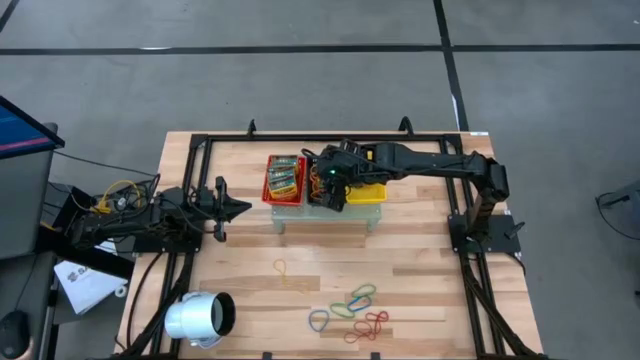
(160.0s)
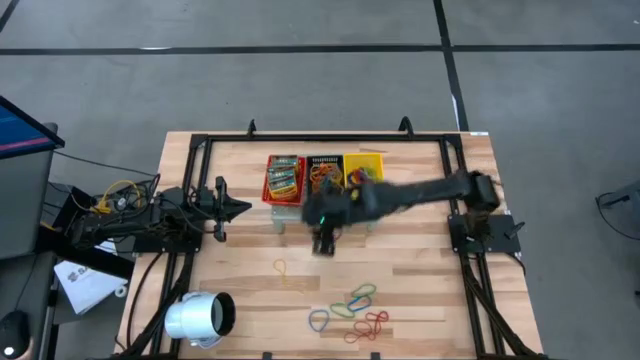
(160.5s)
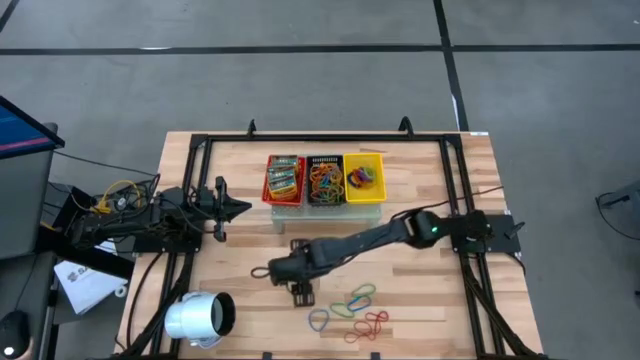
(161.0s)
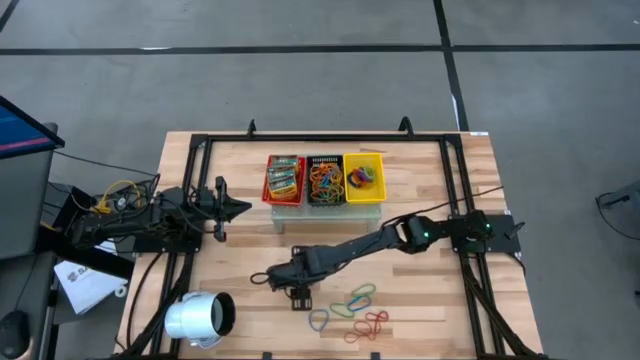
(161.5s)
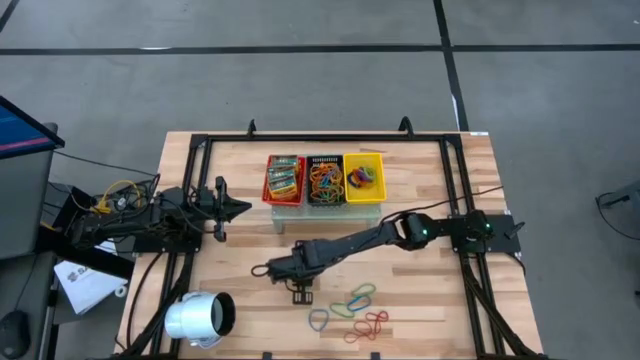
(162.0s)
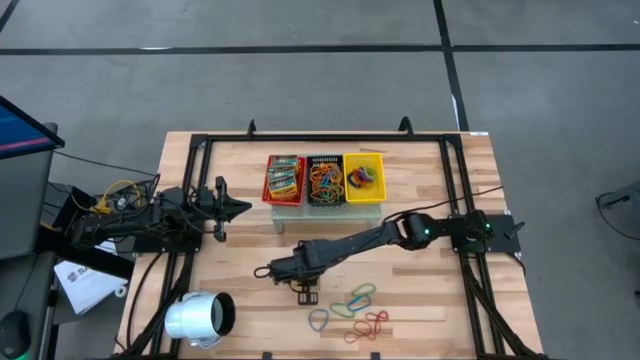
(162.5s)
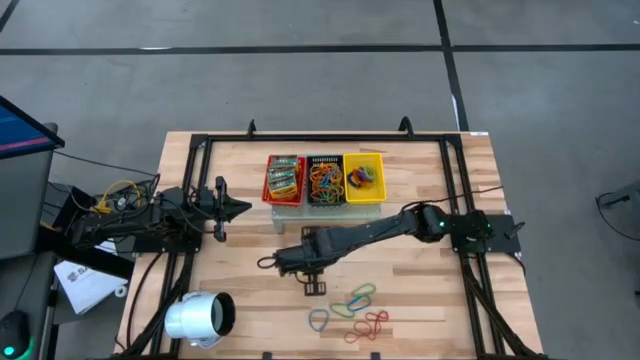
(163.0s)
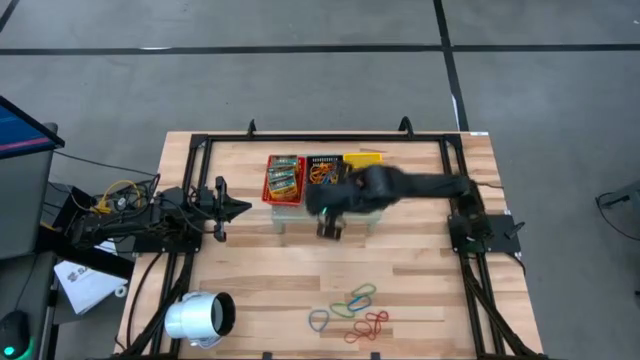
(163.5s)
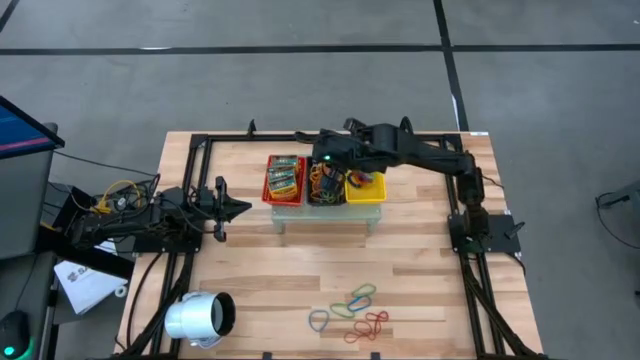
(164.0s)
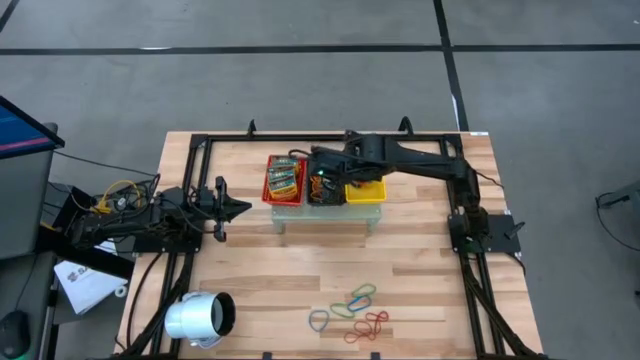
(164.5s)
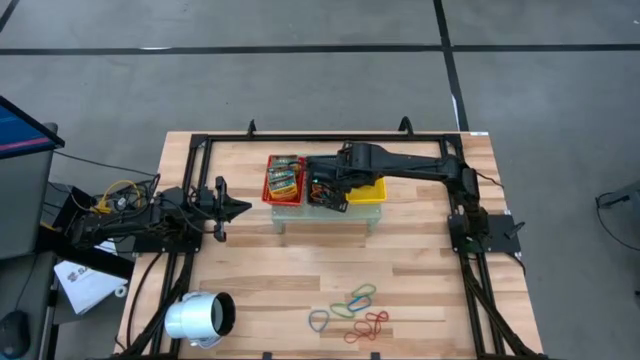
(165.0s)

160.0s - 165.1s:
Task: Pick & Place Office Desk Supplies
Put the yellow rubber band into the black bin on the shelf

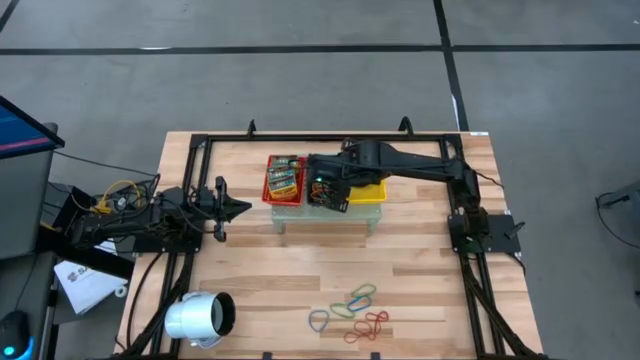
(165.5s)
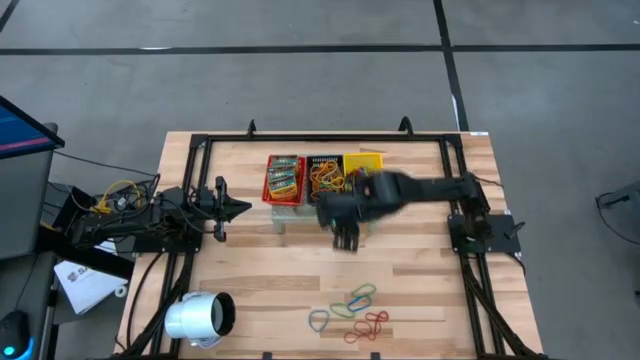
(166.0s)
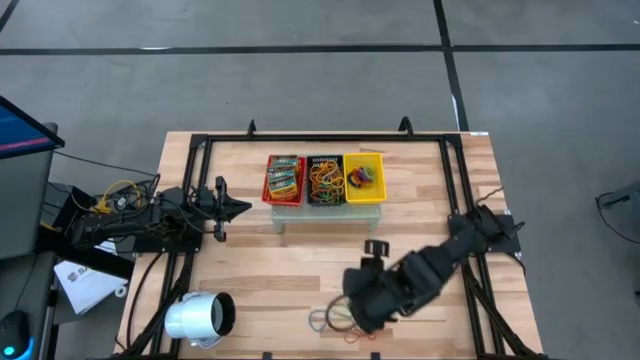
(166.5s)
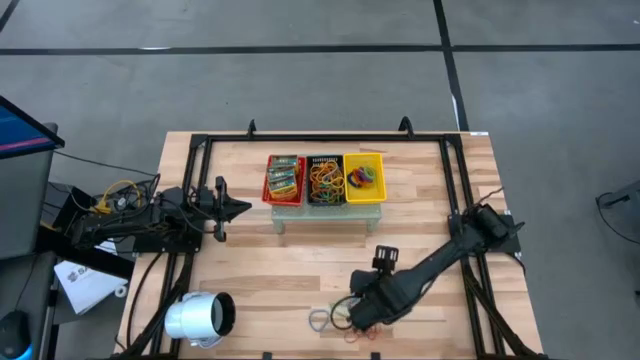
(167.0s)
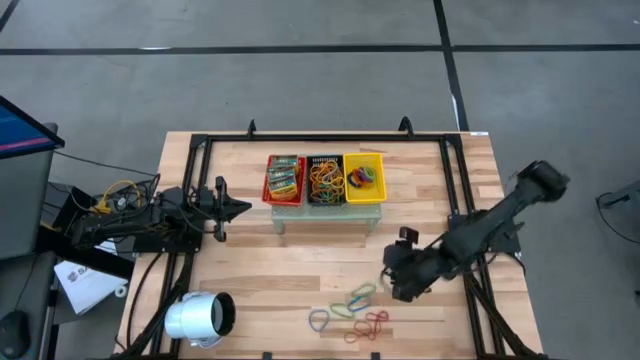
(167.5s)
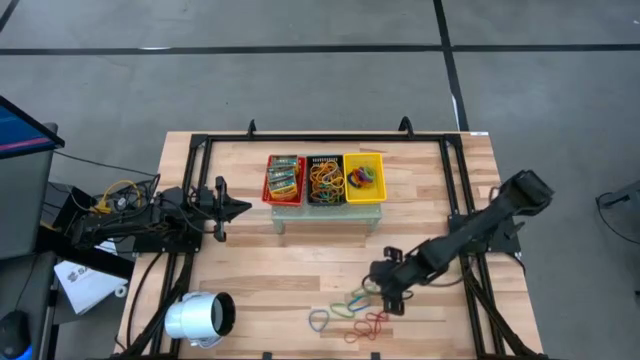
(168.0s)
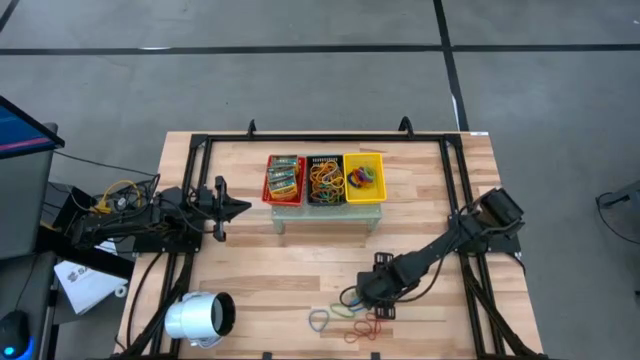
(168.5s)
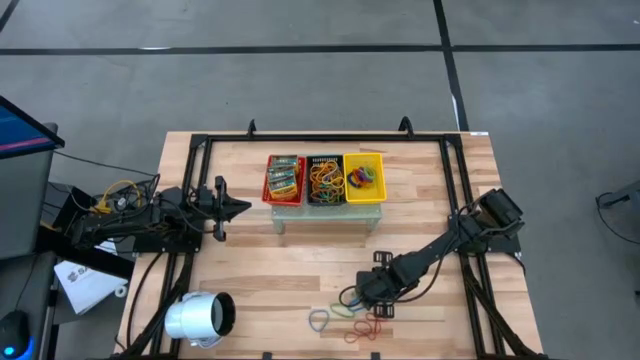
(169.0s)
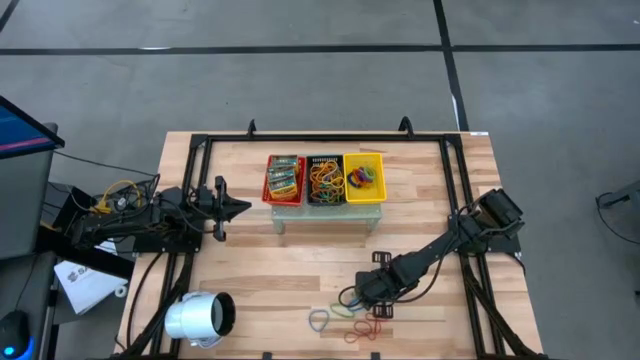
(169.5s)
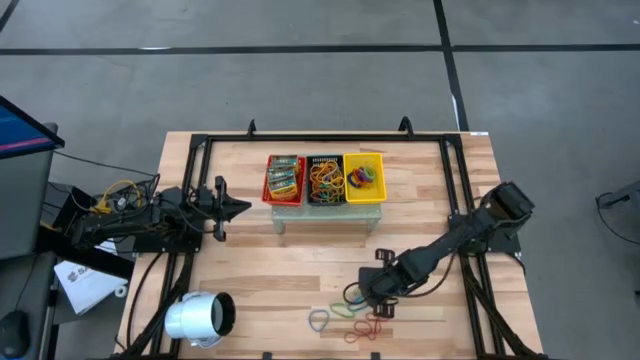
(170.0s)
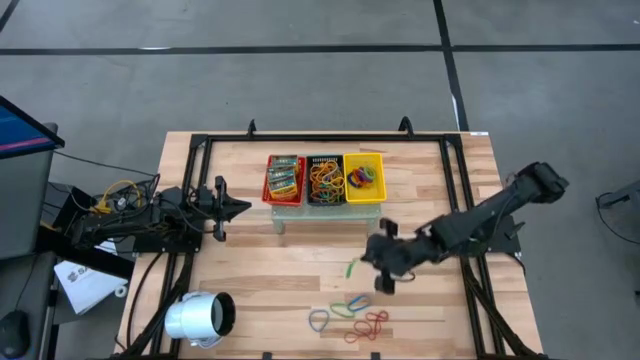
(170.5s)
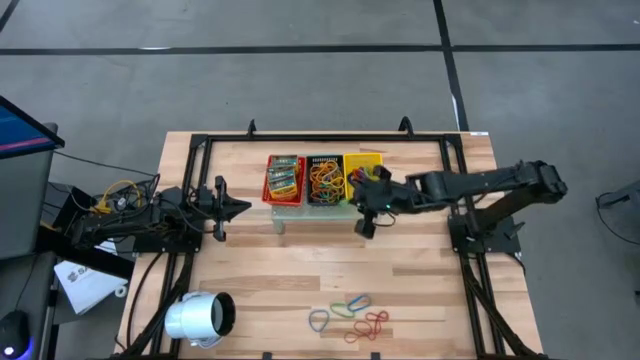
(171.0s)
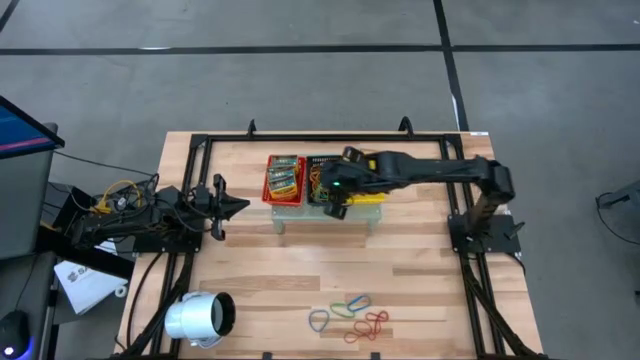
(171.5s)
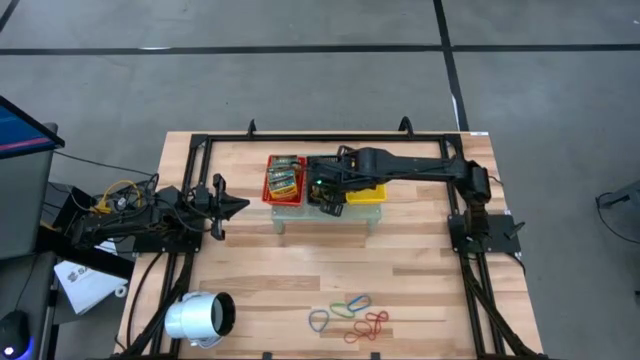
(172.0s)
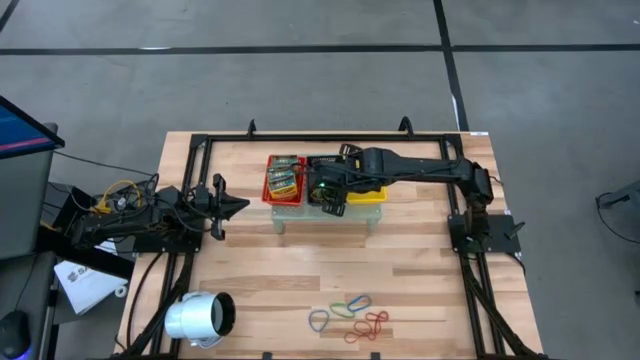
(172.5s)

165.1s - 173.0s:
Put the green rubber band into the black bin on the shelf

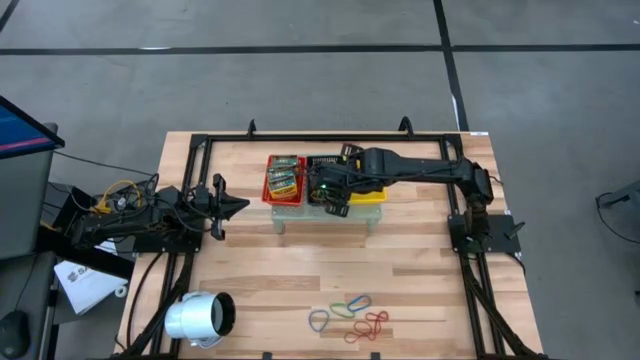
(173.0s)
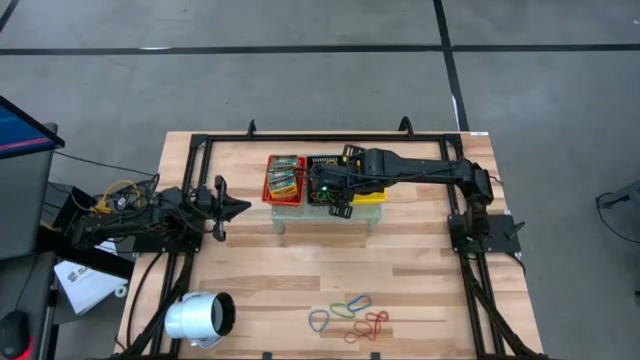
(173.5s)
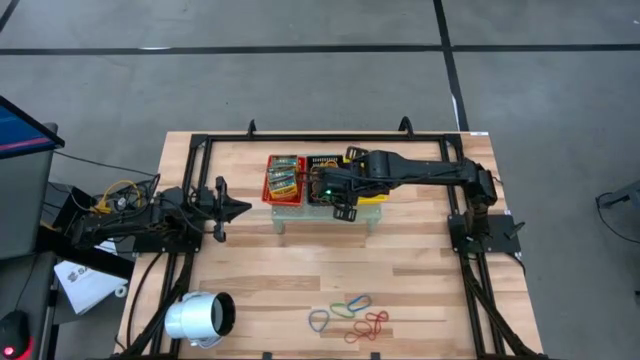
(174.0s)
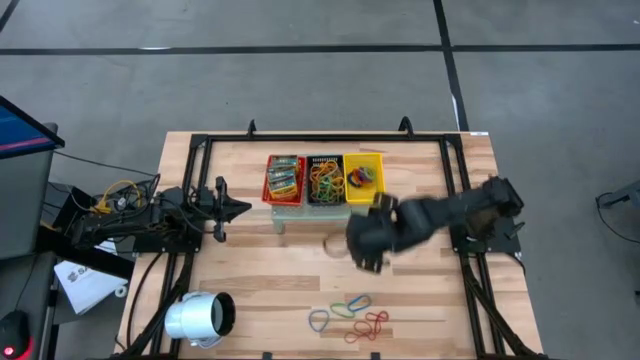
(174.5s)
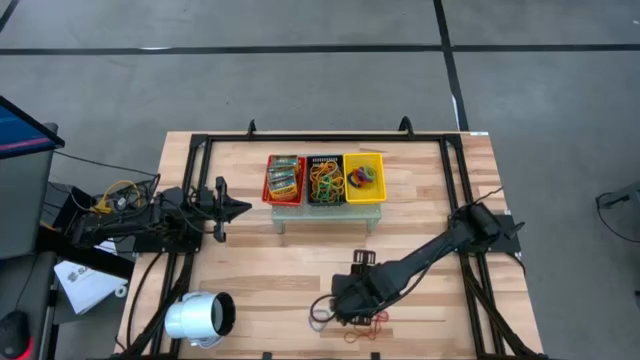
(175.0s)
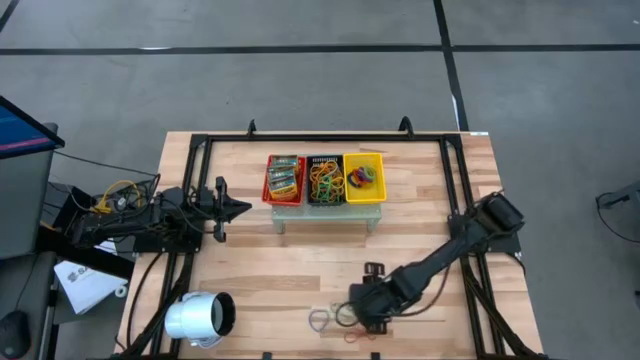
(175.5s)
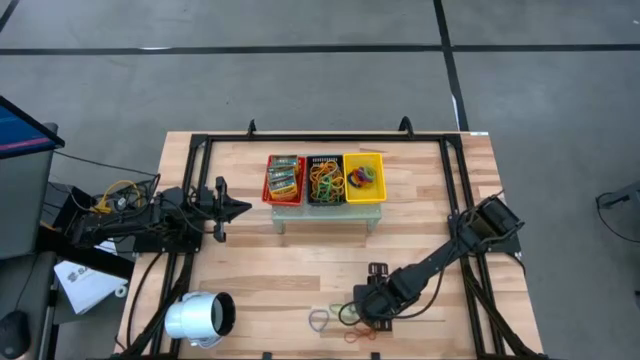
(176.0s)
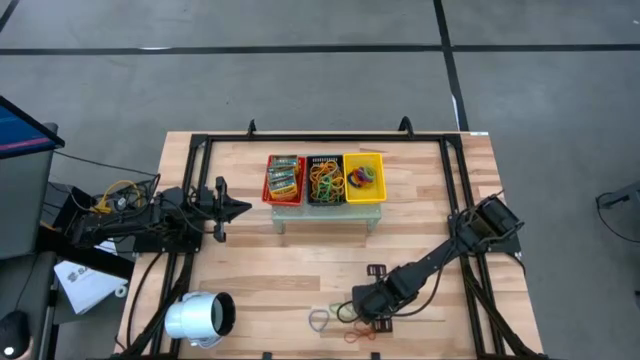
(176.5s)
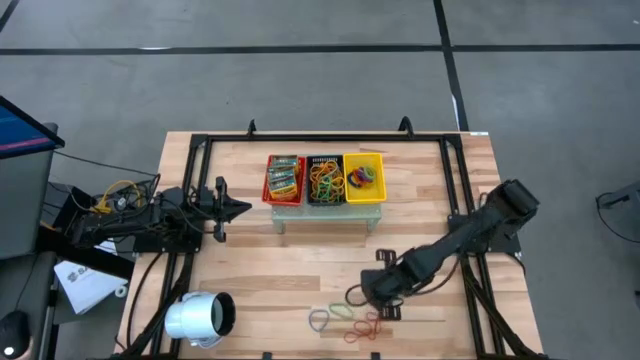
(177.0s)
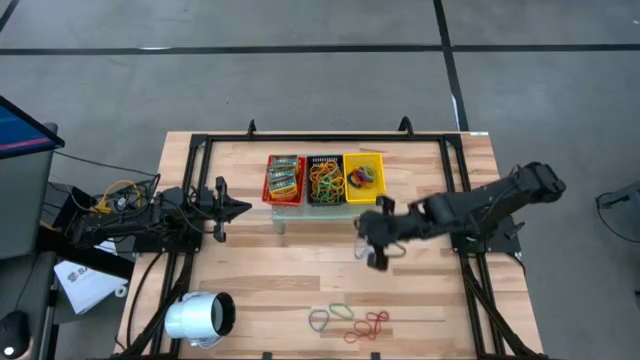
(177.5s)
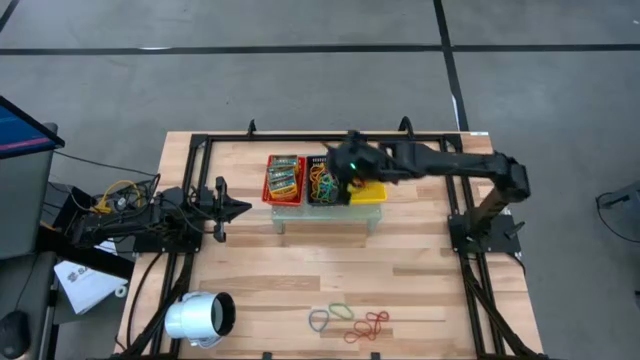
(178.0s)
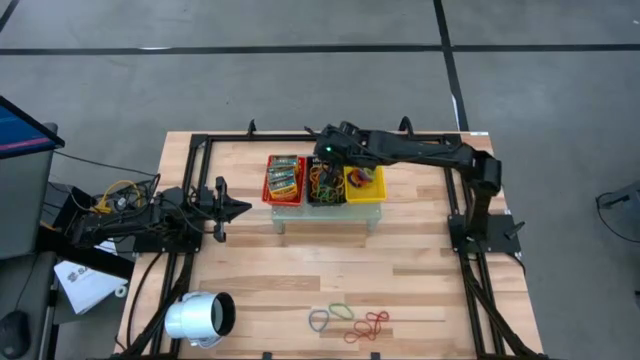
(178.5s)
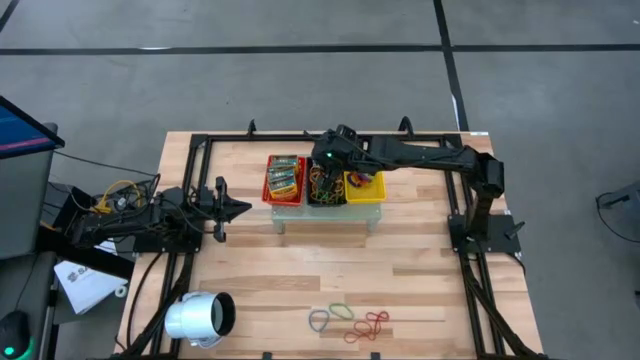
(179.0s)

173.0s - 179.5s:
Put the blue rubber band into the black bin on the shelf

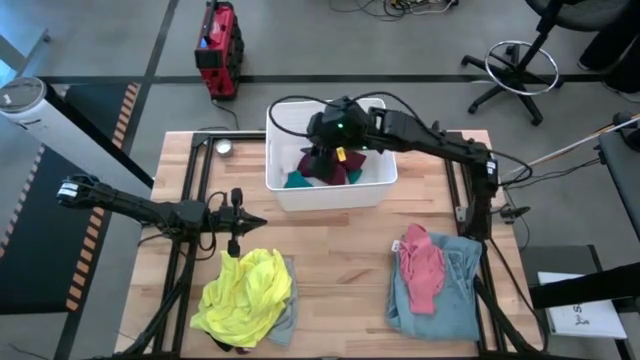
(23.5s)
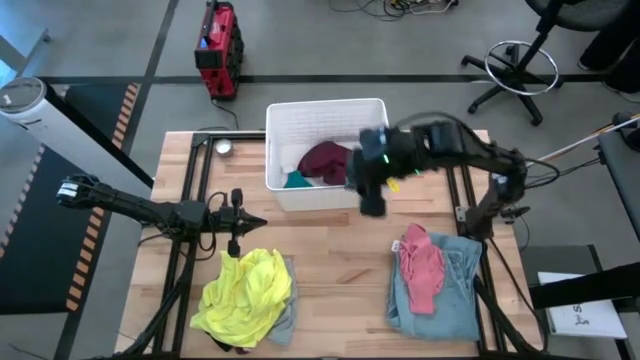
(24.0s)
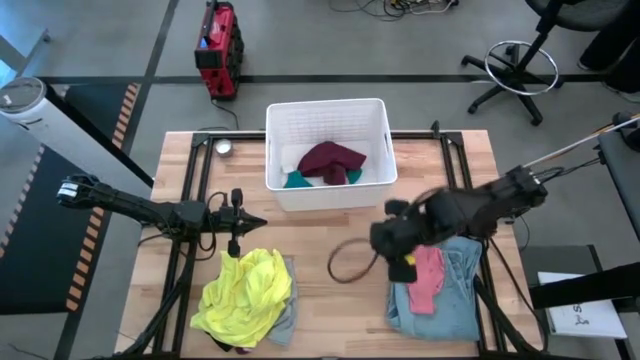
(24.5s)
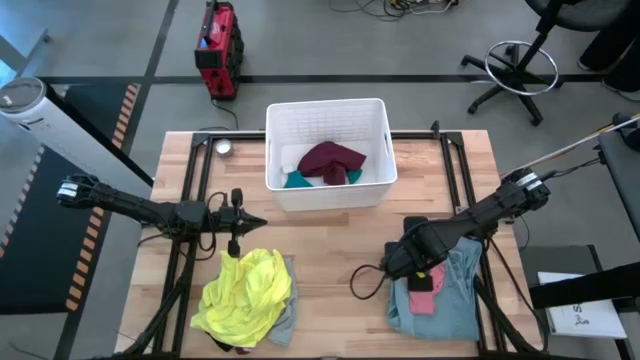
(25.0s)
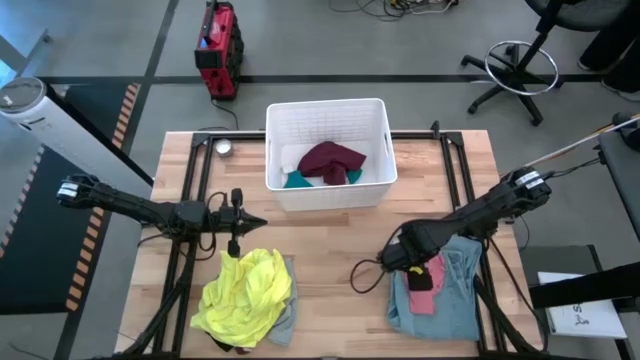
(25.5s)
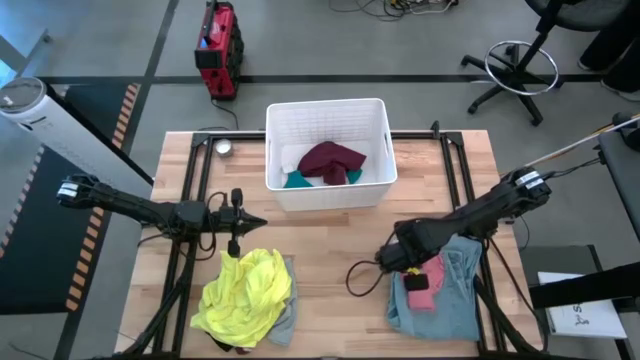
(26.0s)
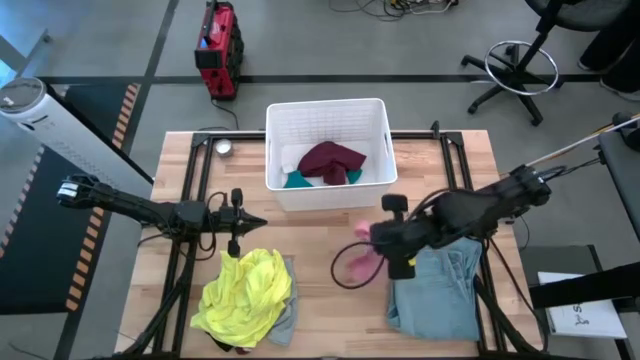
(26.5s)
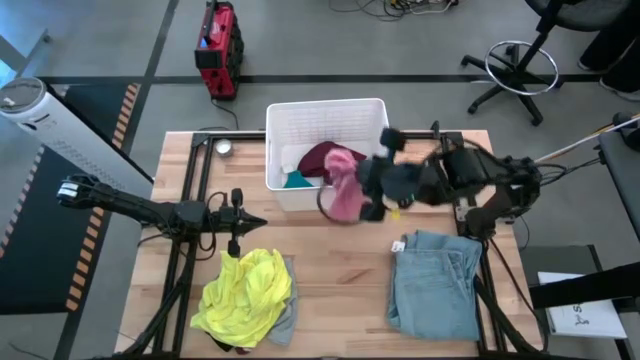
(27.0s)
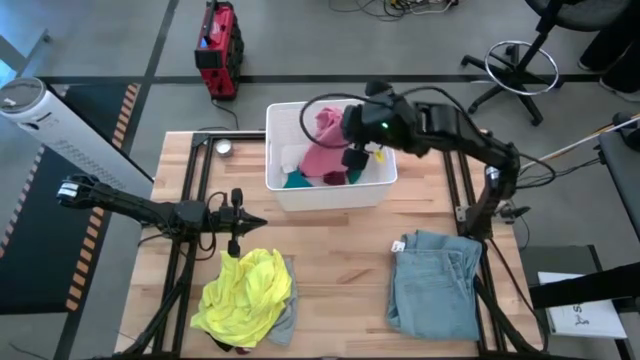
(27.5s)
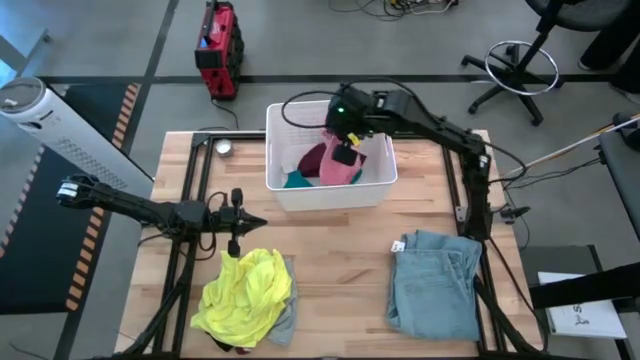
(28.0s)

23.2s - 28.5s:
Task: Sort clothes
Put the pink boxer into the white laundry bin
